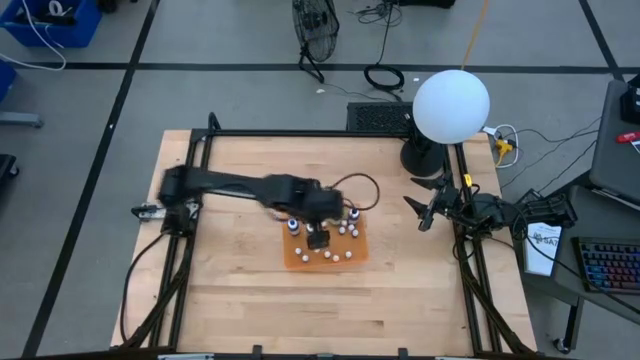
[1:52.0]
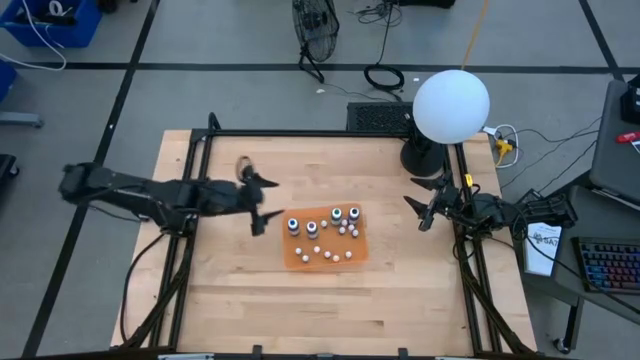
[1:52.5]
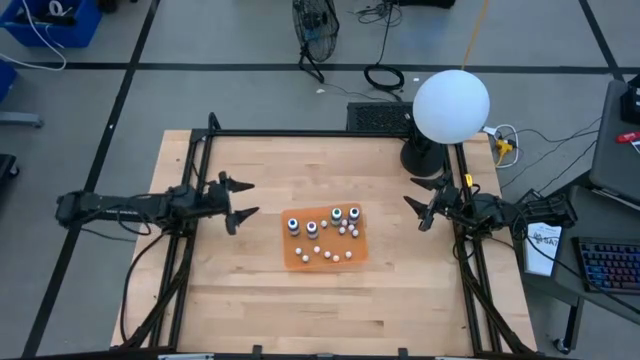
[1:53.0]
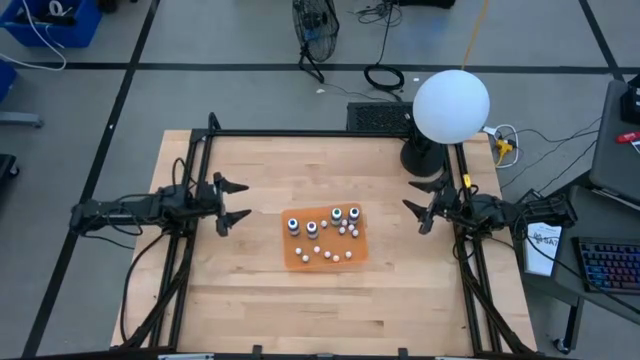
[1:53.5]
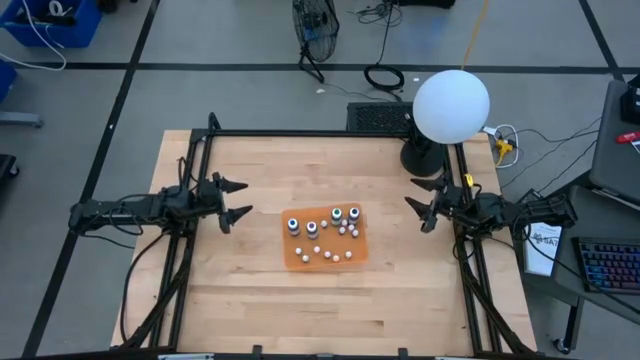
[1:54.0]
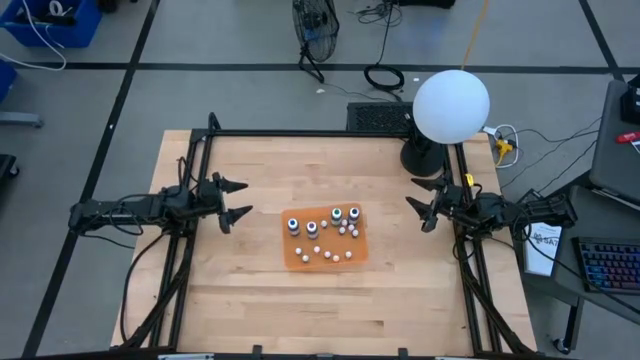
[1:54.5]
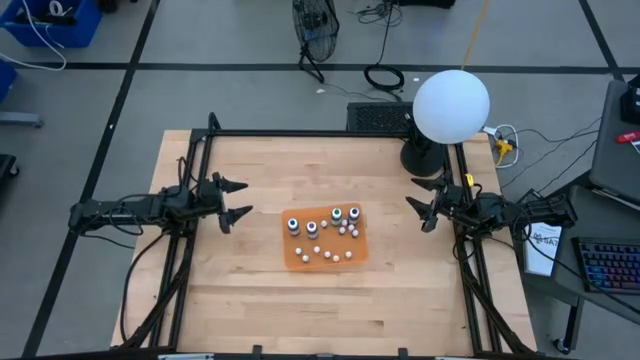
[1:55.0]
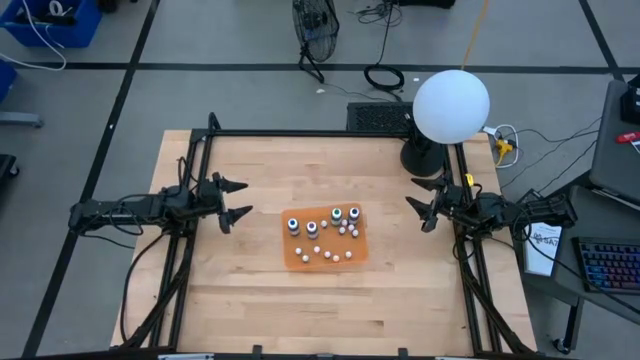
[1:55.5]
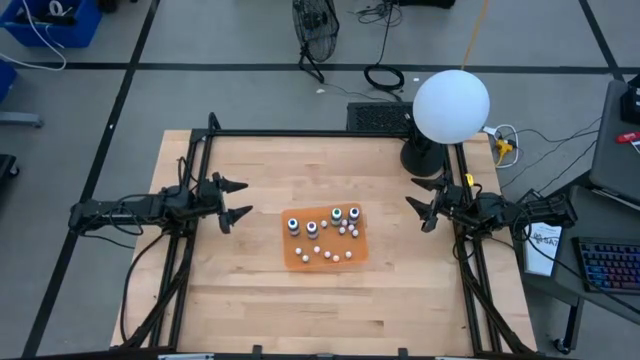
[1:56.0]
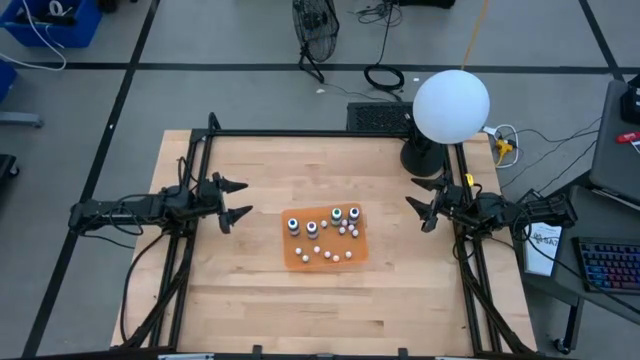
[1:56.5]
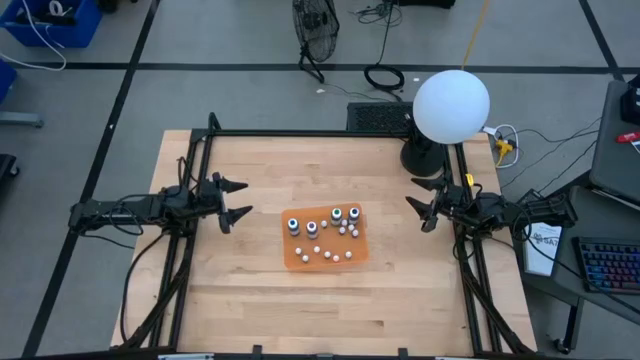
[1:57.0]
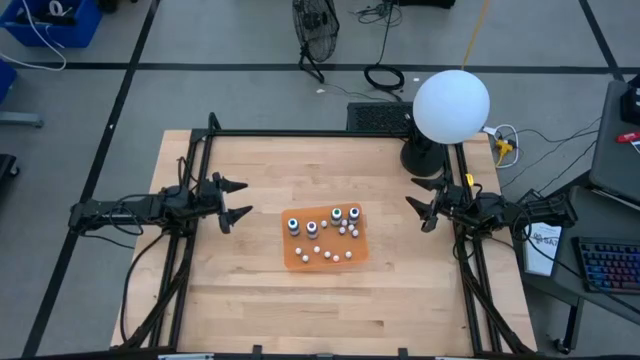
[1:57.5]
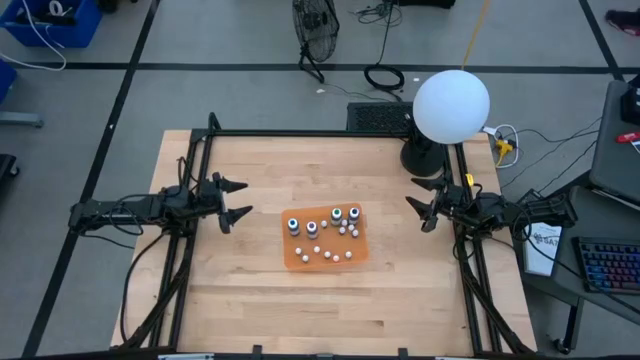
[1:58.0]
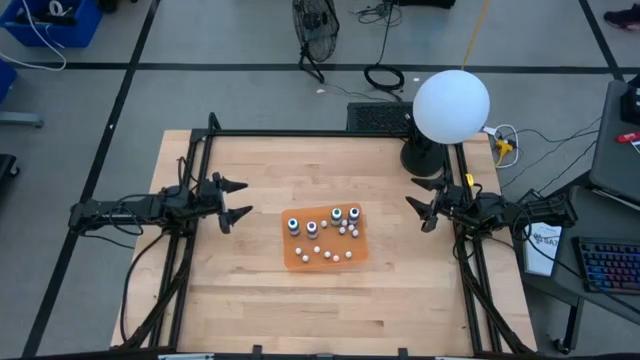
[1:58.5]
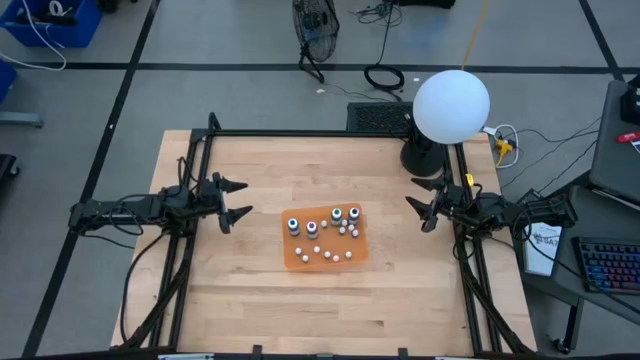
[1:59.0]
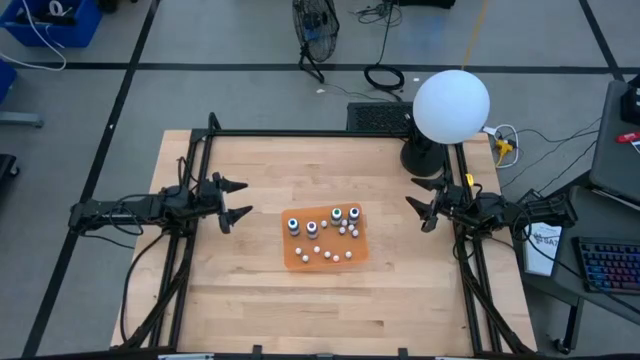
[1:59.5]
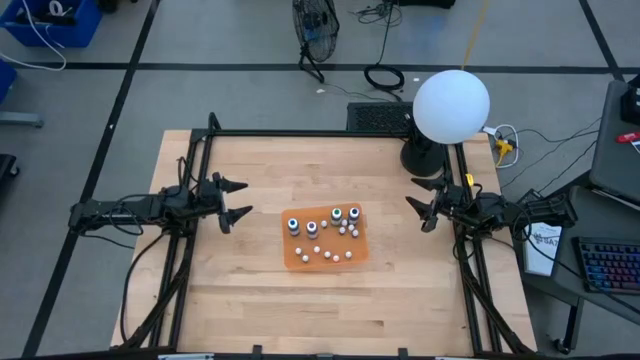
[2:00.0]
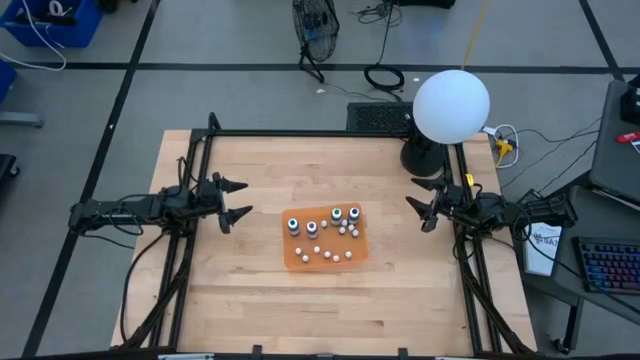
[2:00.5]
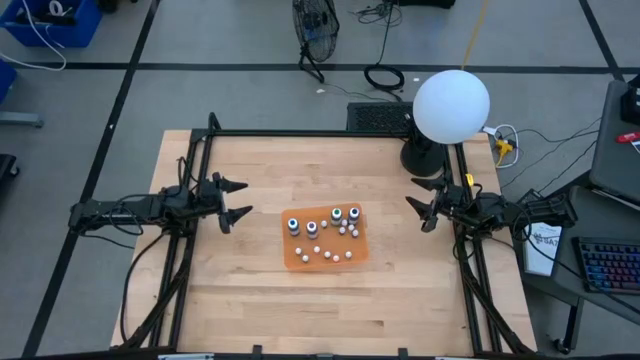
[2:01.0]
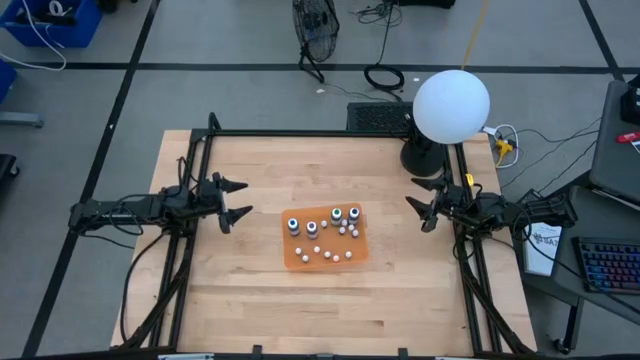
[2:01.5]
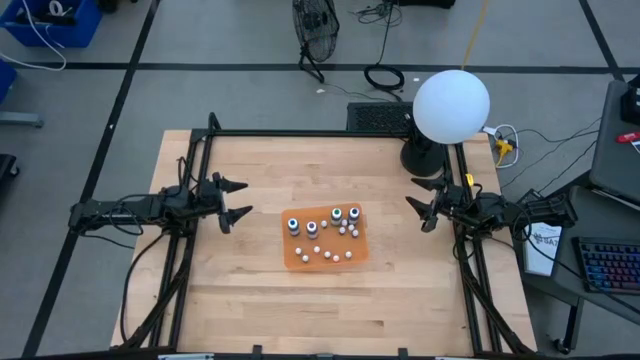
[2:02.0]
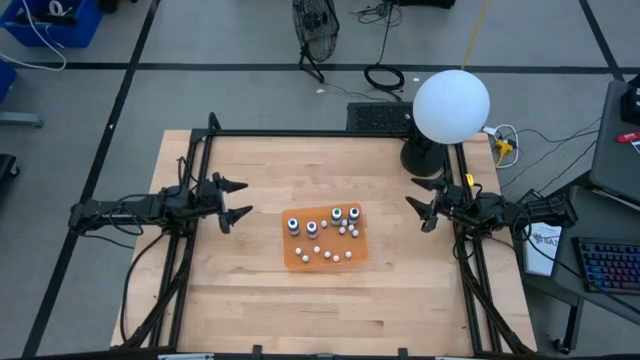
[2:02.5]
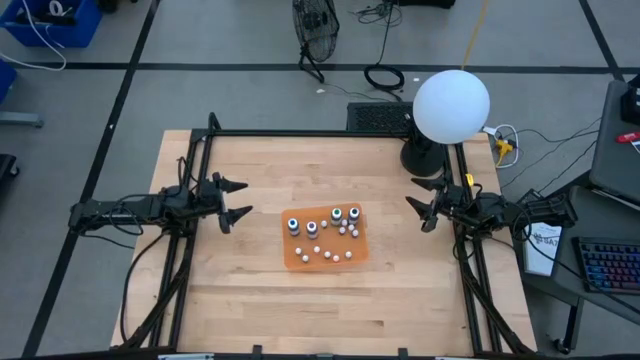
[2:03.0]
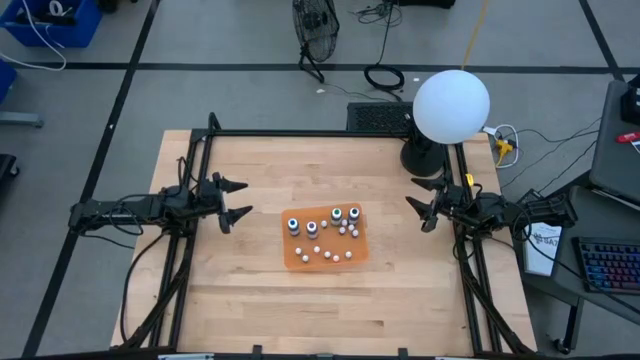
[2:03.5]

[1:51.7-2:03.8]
Task: Pick & Place food coloring
Return to Home Position

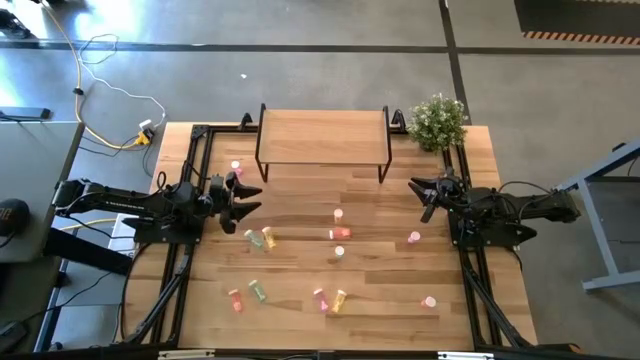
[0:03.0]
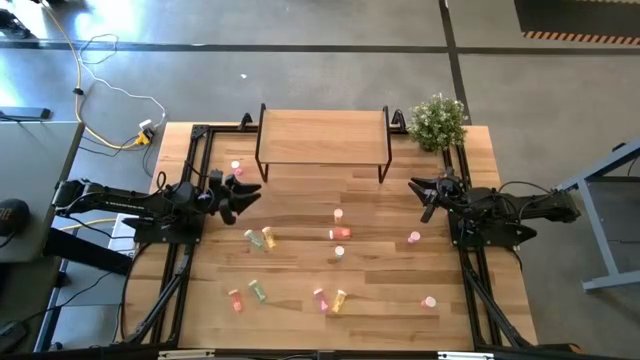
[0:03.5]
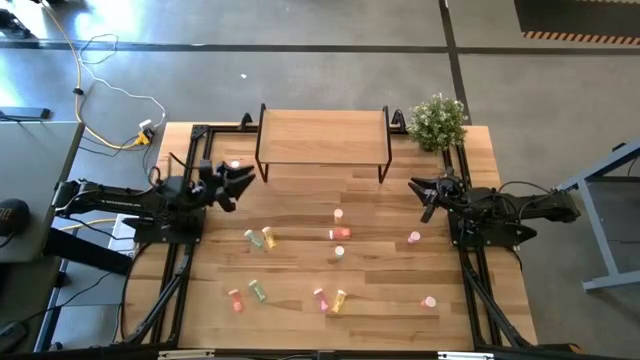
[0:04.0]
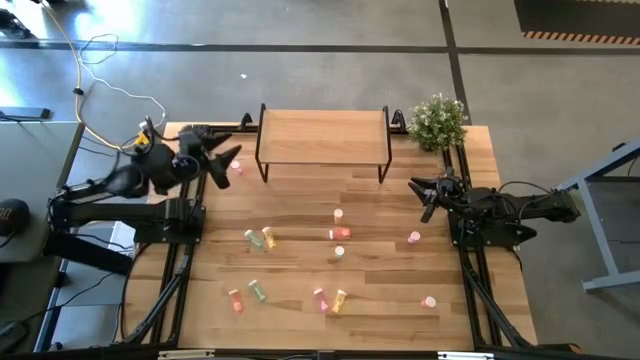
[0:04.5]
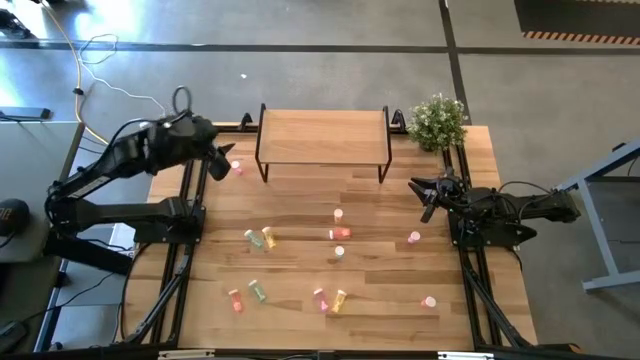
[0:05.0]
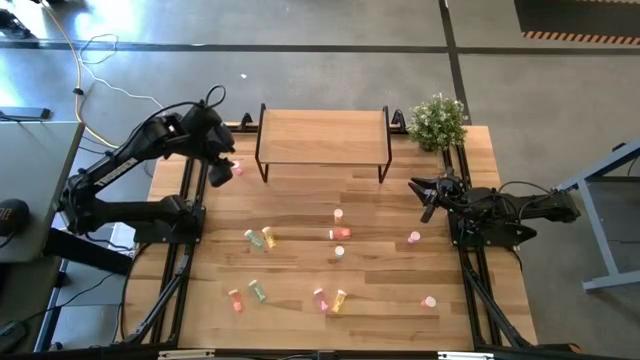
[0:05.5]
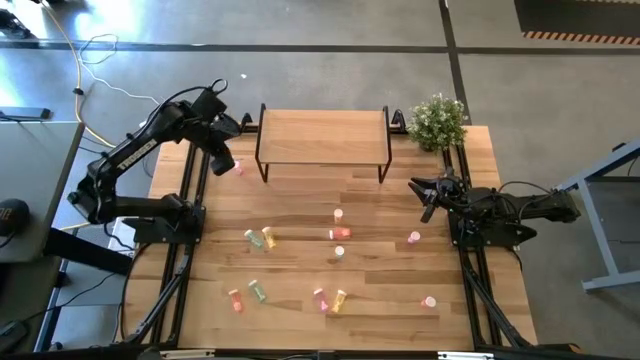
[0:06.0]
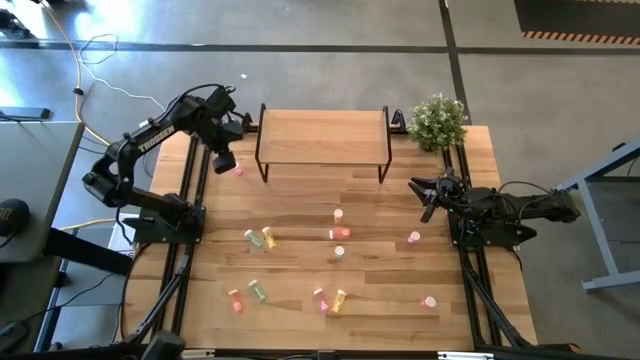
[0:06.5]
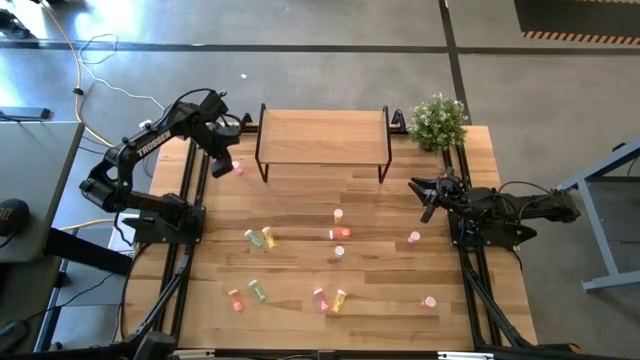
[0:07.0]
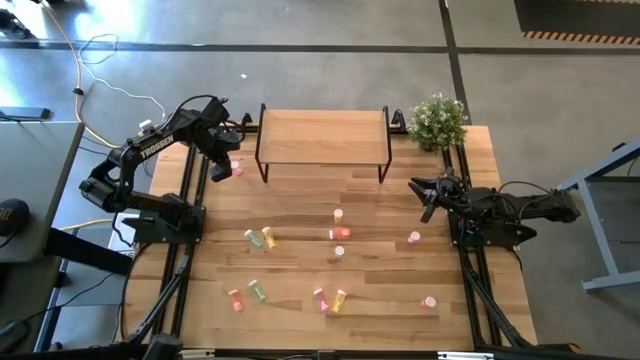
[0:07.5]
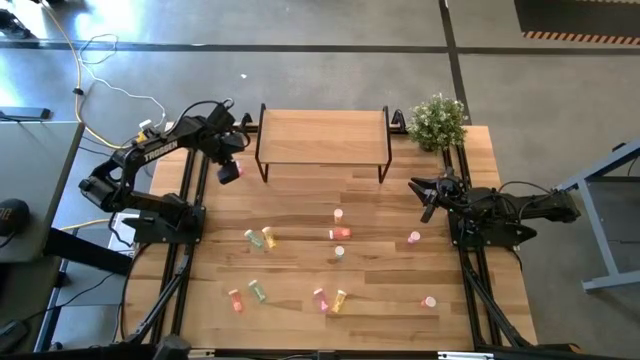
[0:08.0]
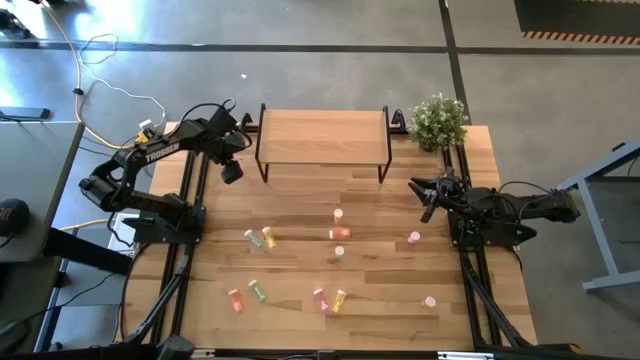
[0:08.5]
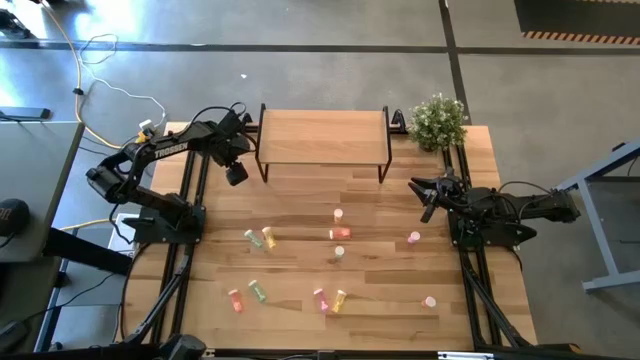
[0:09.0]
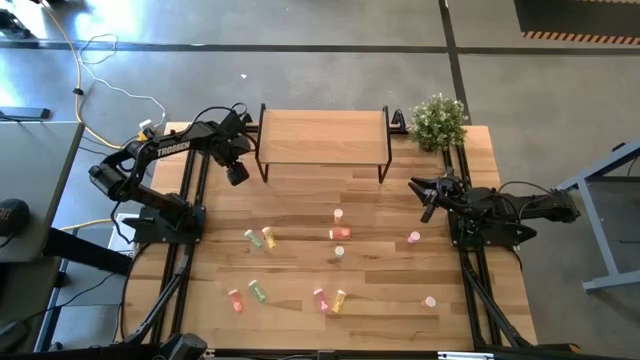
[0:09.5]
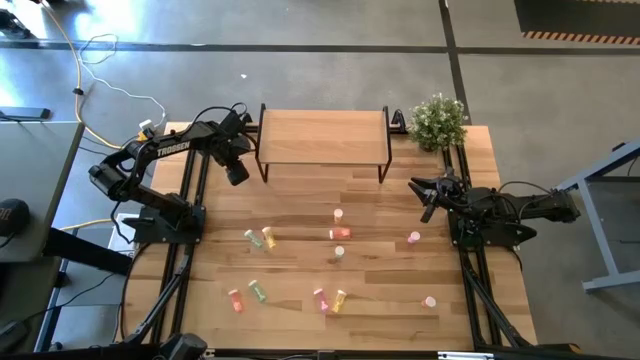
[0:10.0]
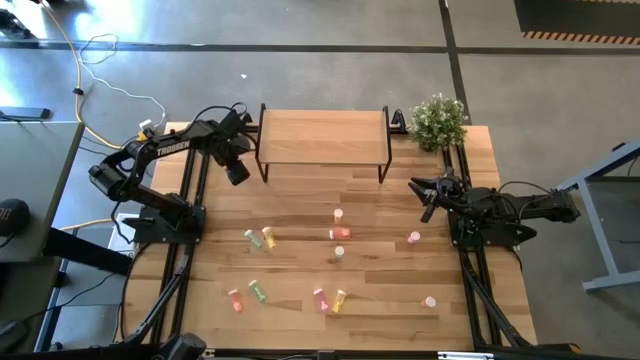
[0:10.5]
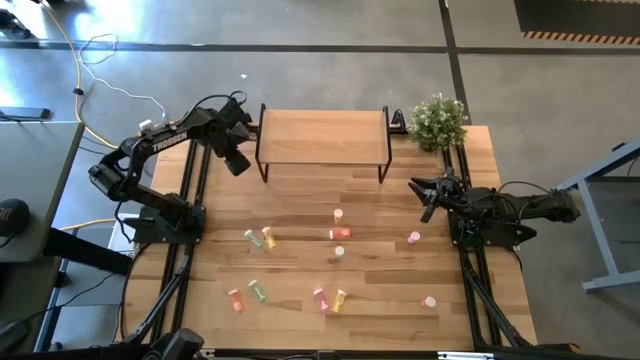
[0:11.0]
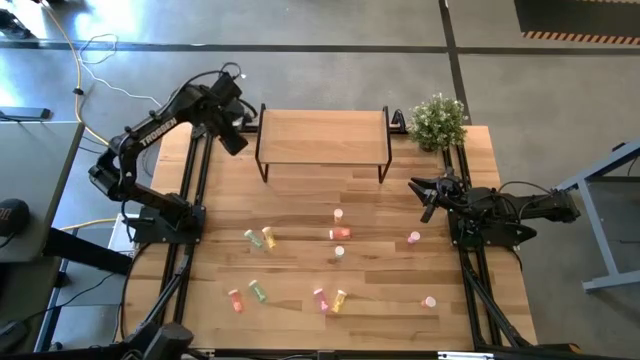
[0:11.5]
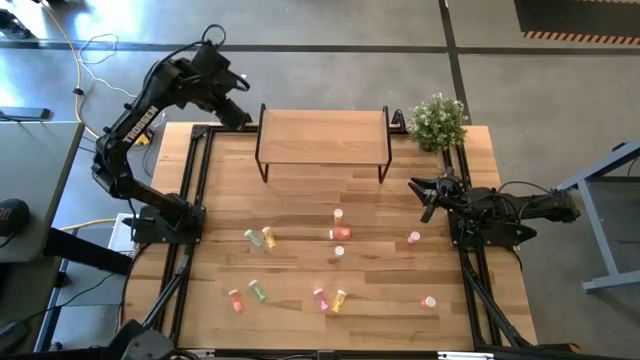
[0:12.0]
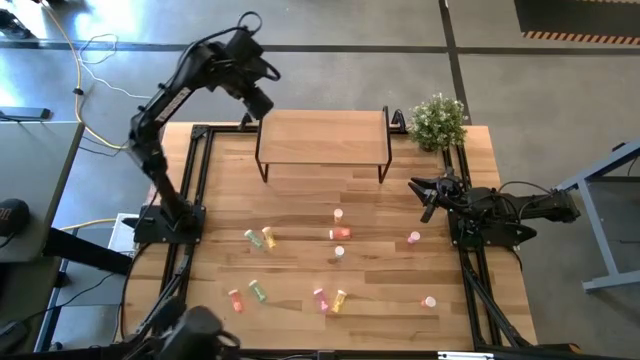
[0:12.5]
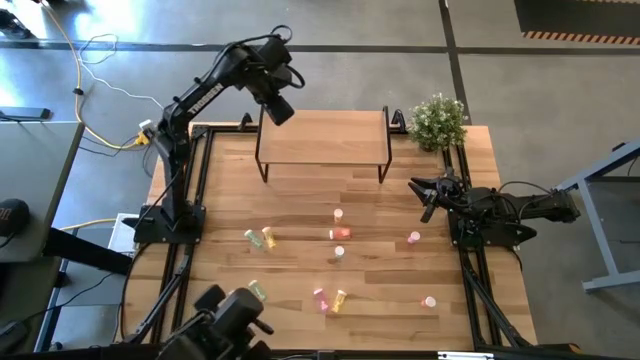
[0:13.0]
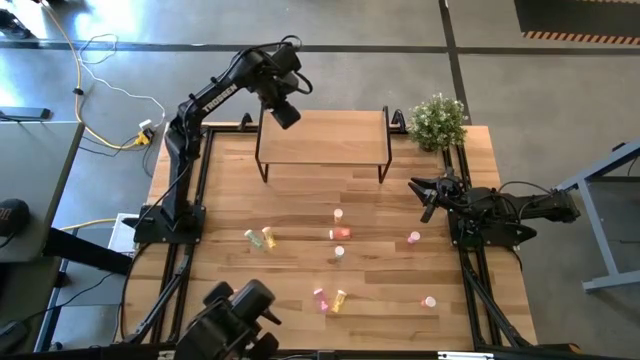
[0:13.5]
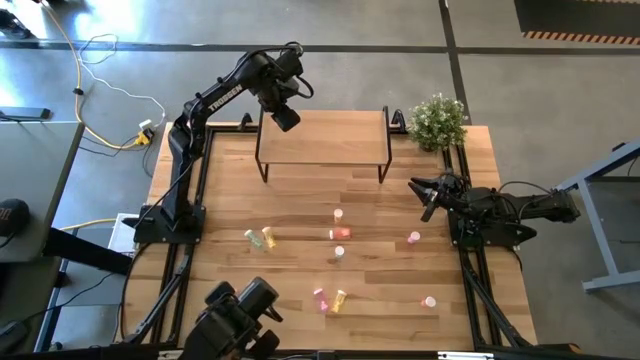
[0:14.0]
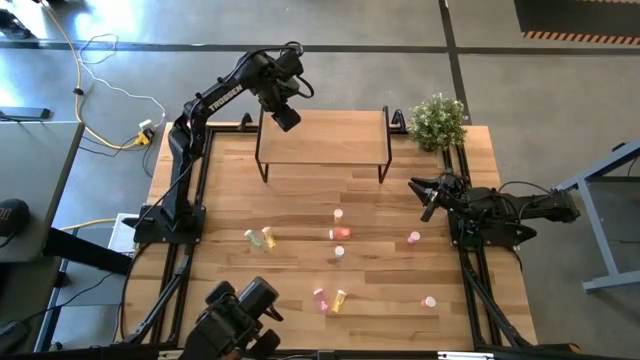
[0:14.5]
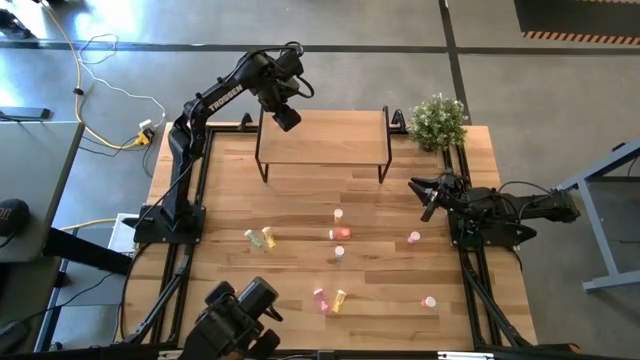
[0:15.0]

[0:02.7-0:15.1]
Task: Pick and place medicine bottles onto shelf by color
Put the top pink pill bottle on the shelf
